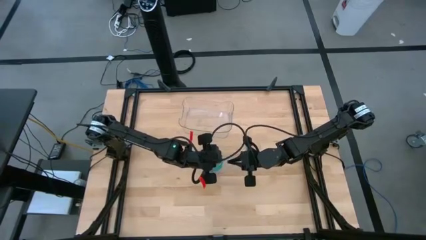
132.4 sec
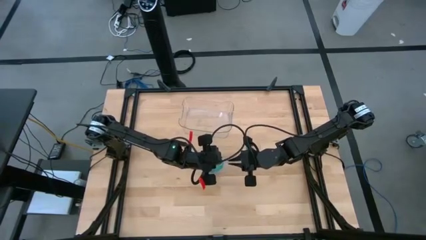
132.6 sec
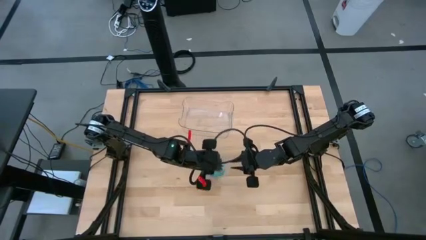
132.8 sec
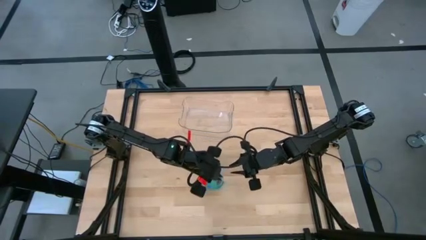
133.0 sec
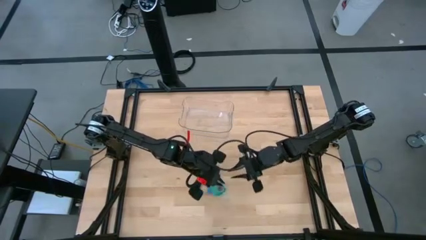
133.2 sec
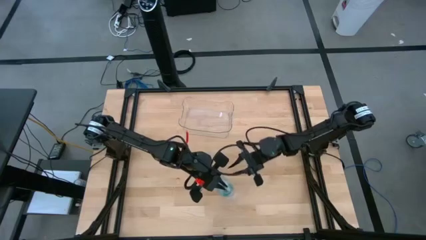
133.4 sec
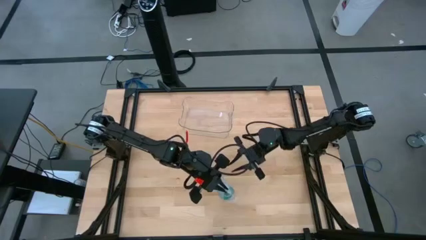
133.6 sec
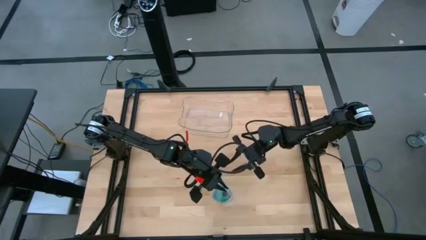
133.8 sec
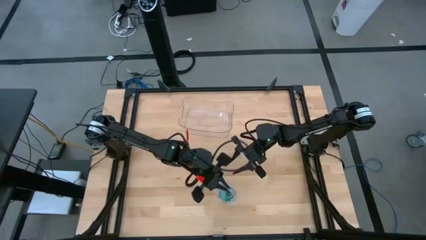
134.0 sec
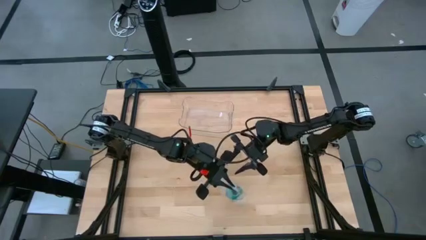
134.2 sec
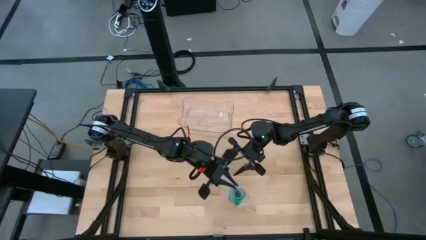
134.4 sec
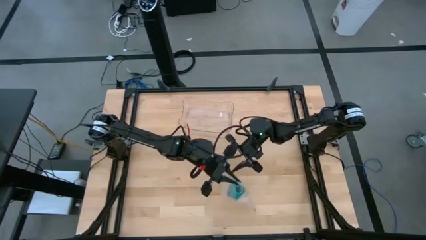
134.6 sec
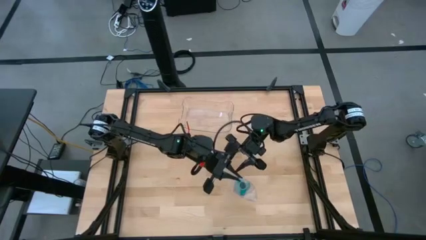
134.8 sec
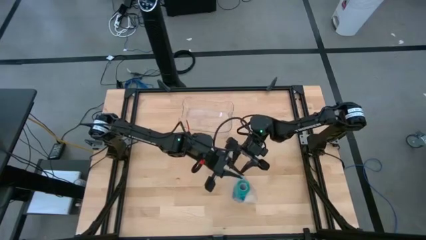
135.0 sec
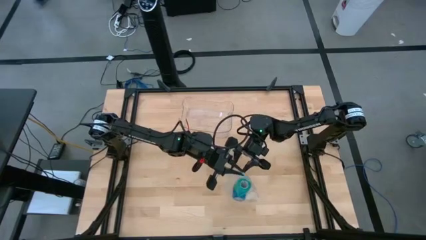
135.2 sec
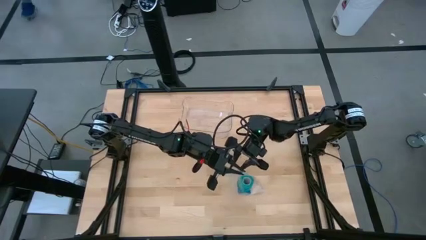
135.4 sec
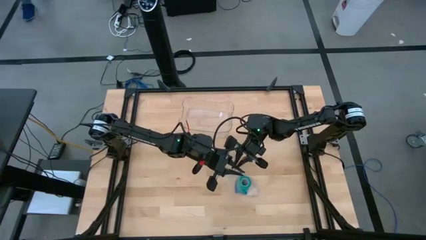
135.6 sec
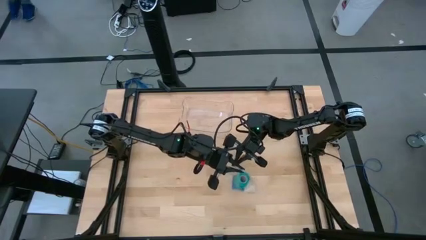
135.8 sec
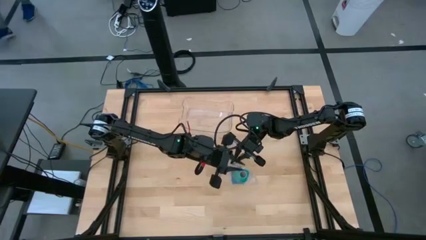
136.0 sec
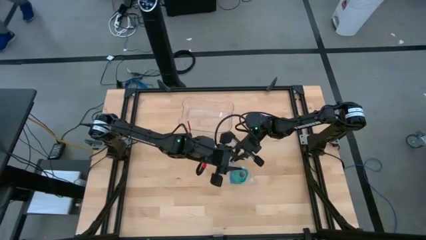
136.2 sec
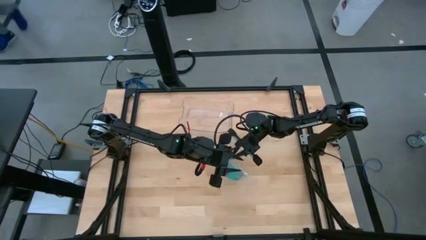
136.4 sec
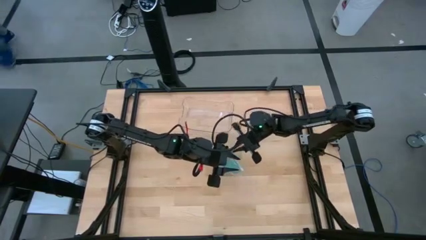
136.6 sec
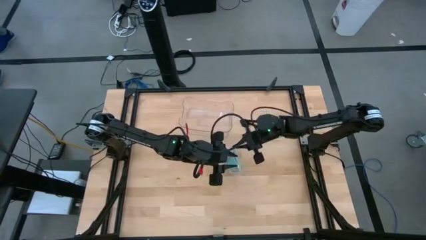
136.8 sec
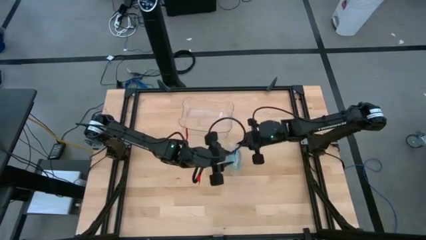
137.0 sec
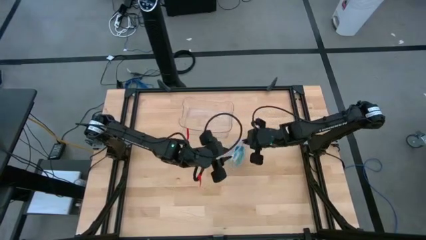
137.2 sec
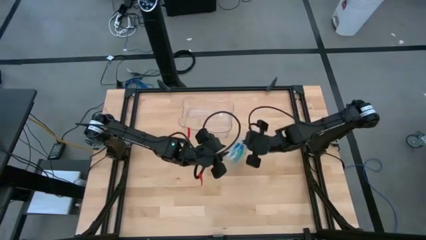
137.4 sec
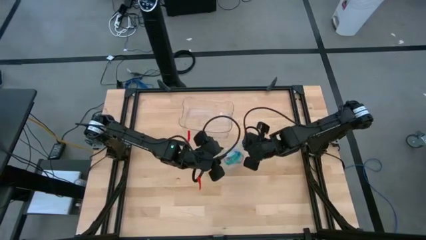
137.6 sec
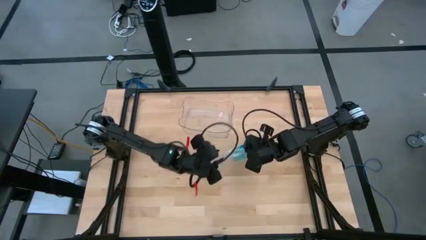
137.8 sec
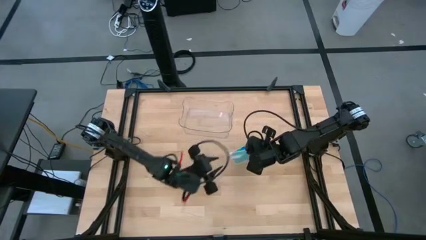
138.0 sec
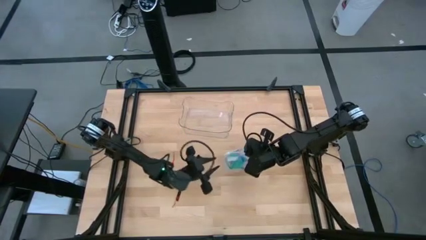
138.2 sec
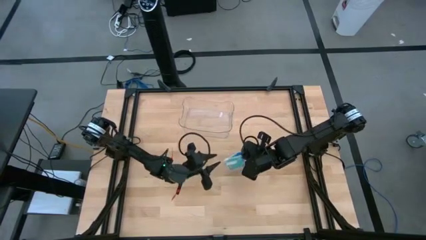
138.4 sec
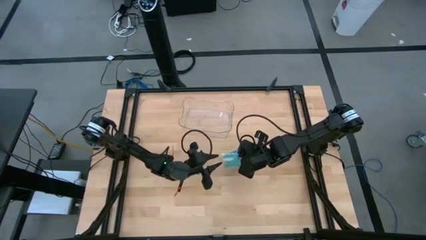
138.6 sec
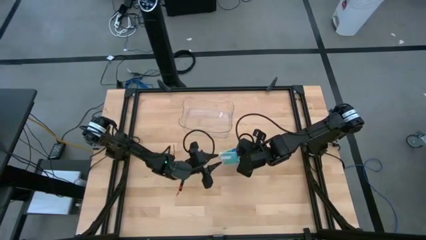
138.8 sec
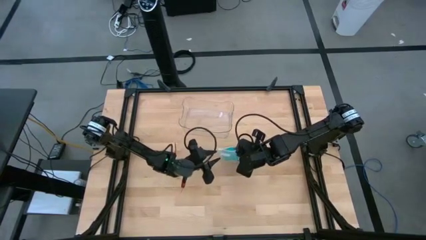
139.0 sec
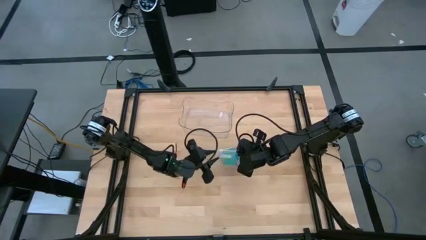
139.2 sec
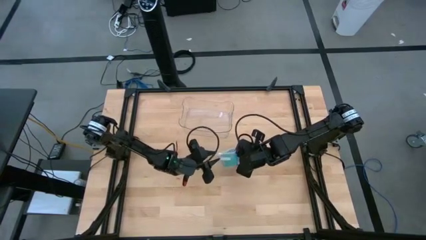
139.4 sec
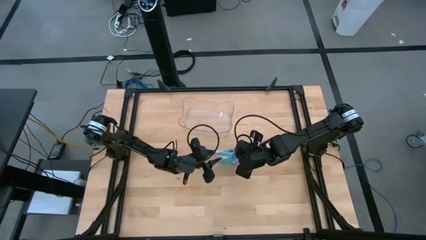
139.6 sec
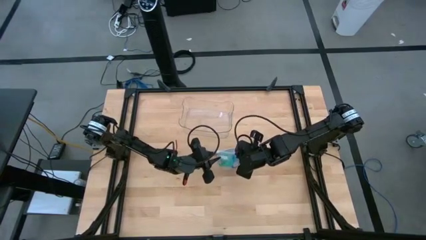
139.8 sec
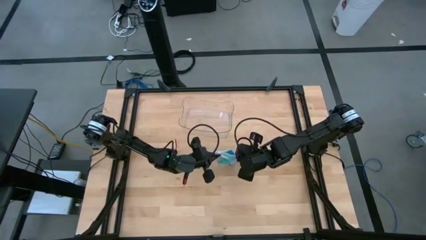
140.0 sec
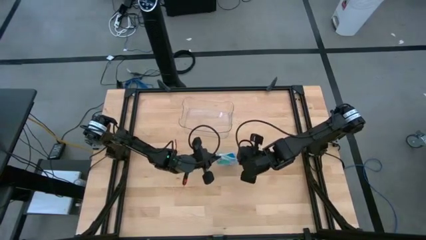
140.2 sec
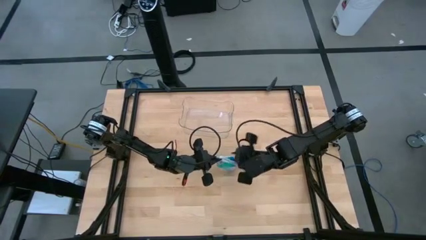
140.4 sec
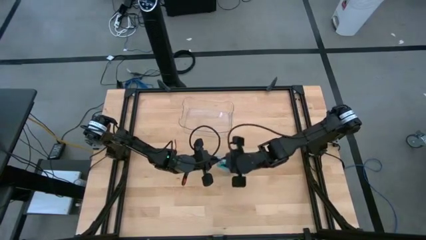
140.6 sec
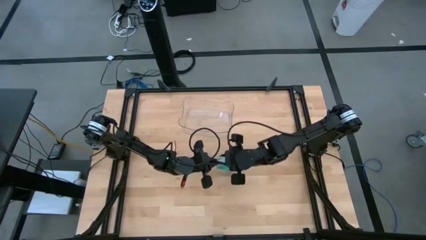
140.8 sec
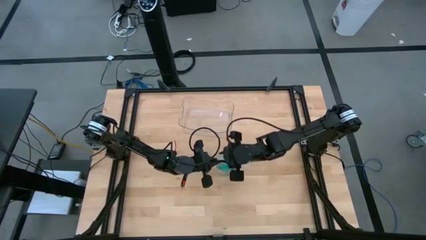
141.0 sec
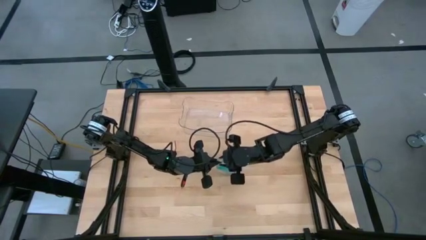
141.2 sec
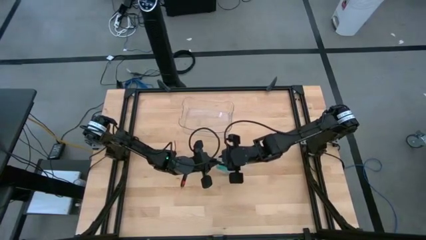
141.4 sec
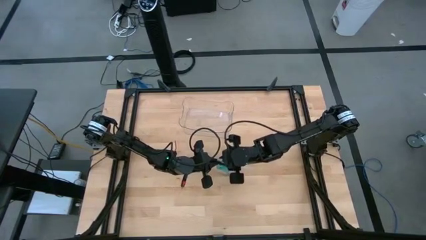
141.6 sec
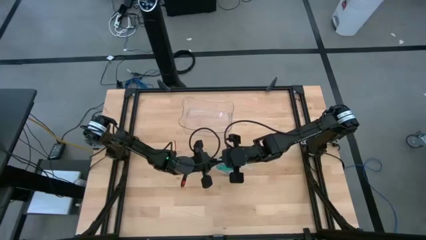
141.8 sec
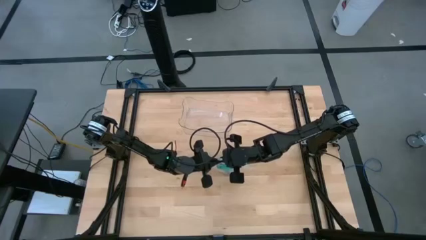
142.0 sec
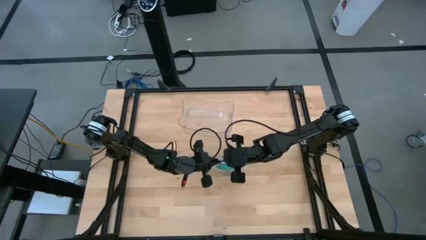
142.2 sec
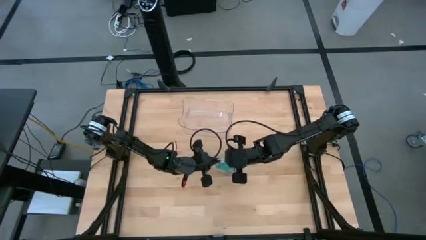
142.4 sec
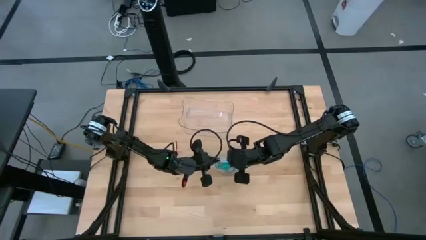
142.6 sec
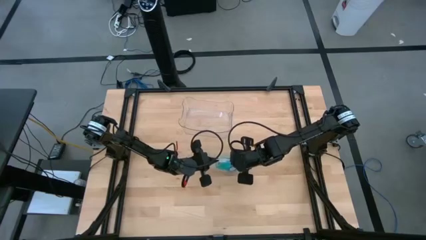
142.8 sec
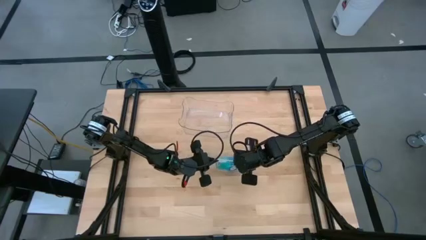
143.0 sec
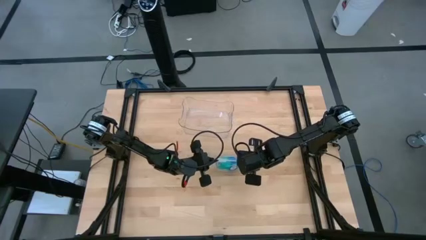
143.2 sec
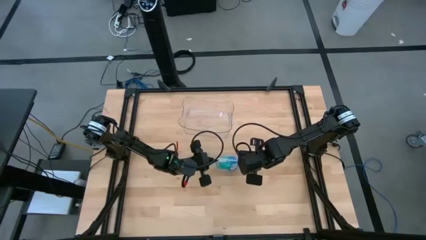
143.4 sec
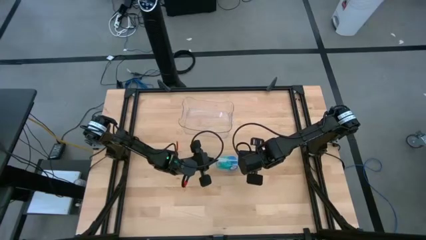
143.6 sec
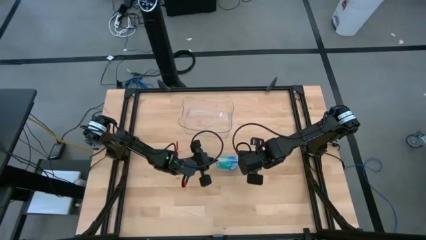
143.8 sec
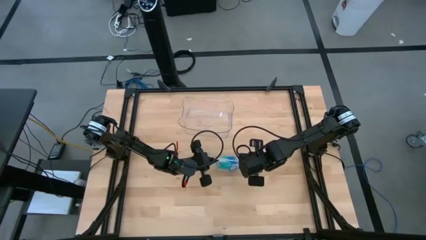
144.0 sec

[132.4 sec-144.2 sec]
Task: Roll bandage
Close the transparent zip bag

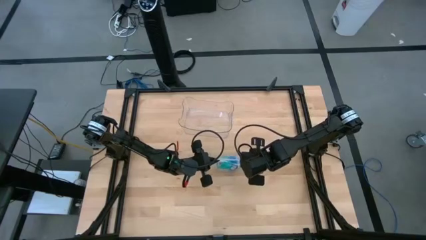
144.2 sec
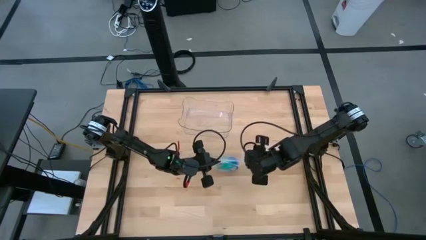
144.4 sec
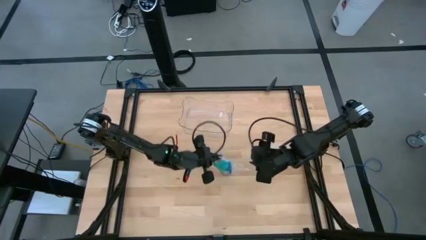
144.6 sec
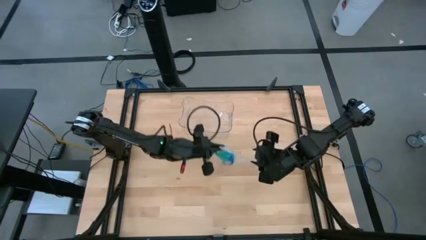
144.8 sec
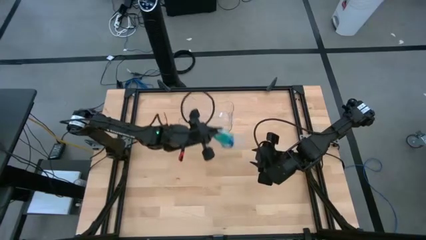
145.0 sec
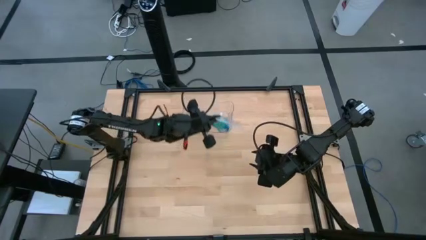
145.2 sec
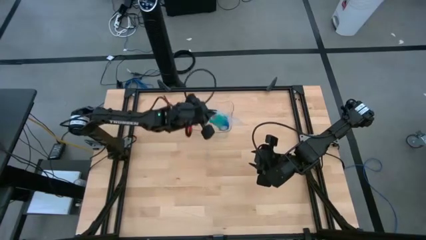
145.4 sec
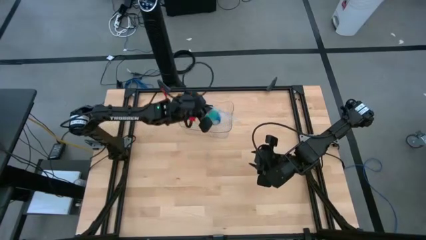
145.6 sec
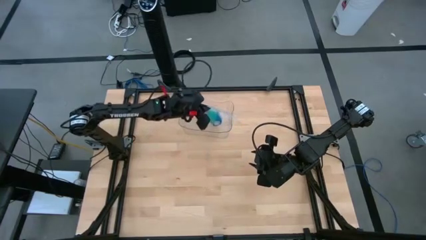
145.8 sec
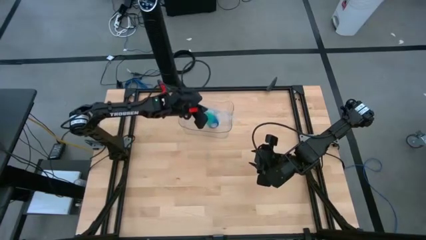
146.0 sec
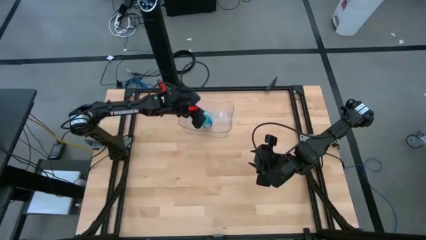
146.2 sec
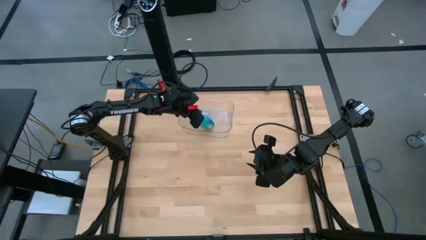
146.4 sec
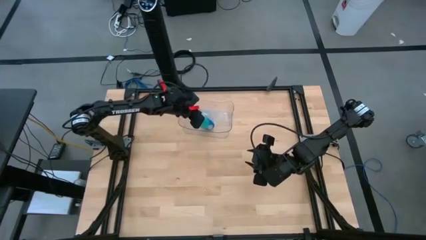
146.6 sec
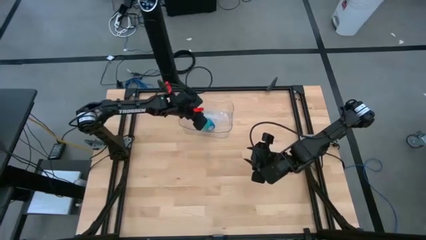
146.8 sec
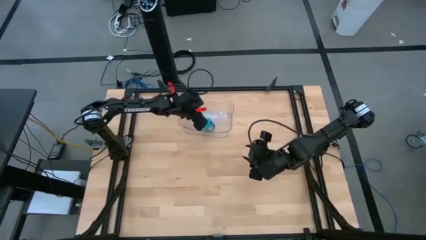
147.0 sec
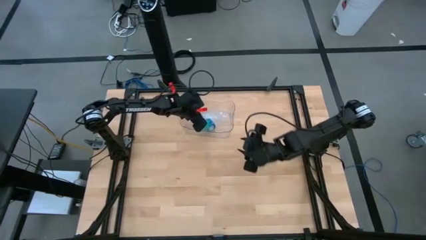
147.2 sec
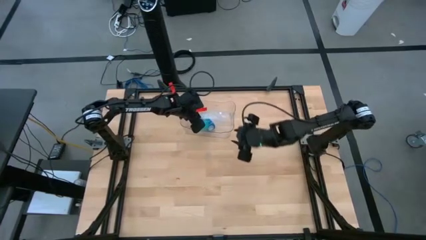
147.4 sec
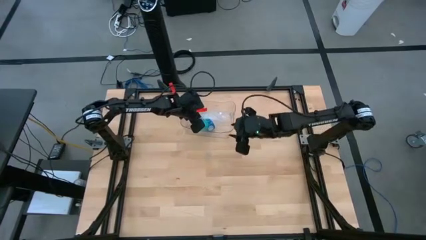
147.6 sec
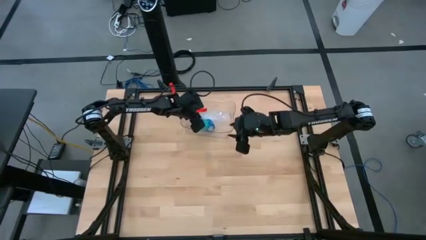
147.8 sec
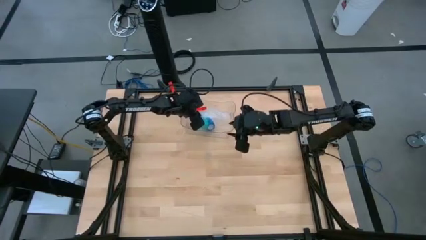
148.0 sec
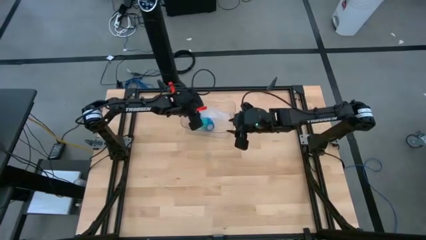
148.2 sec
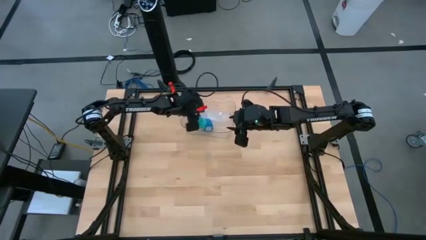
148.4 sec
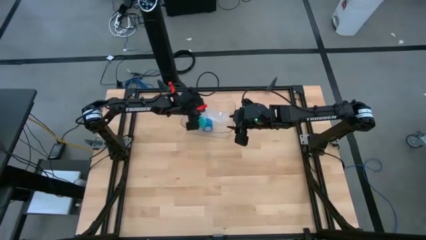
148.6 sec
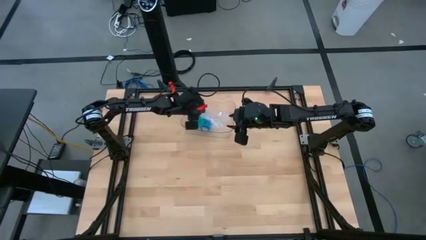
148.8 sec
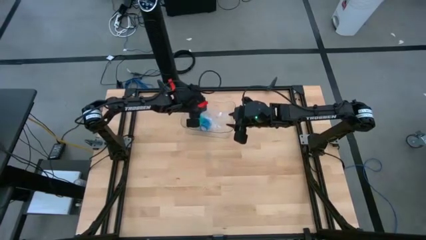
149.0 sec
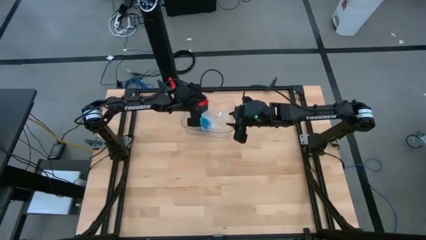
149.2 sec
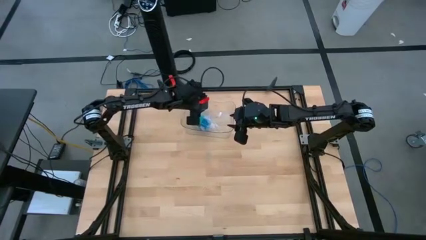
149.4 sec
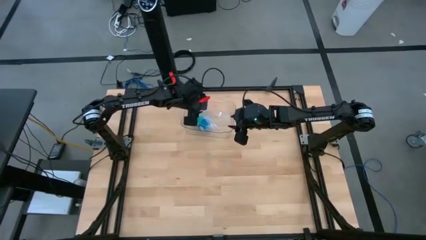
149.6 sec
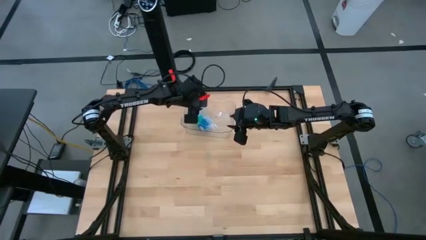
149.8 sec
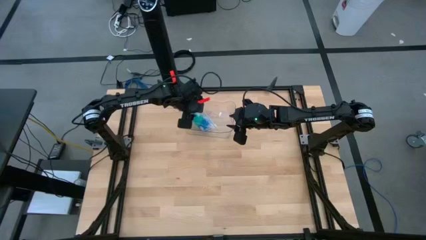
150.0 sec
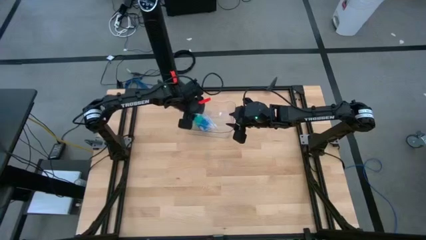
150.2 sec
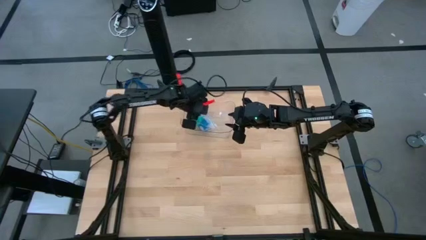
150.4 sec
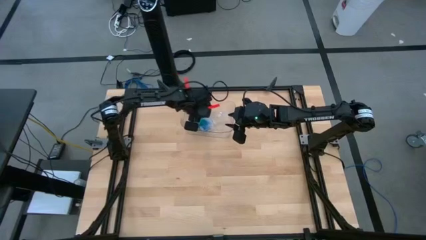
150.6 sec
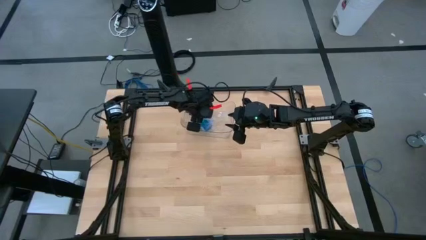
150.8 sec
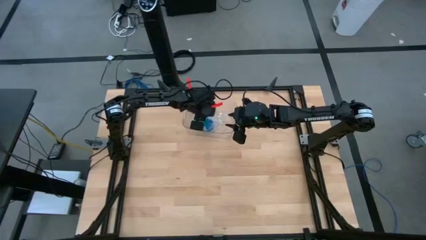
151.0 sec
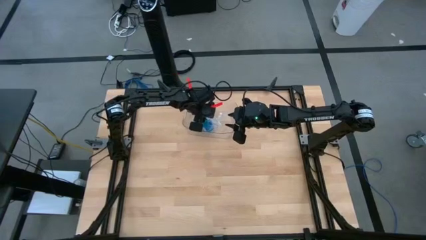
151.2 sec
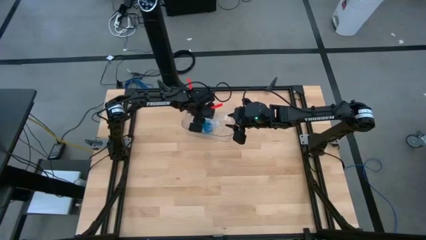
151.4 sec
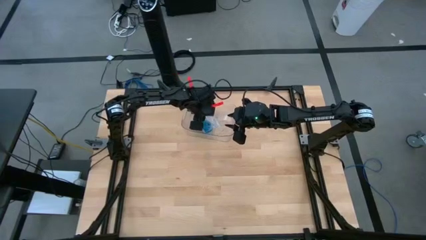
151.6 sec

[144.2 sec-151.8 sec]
Put the transparent zip bag with the rolled green bandage into the transparent bin
